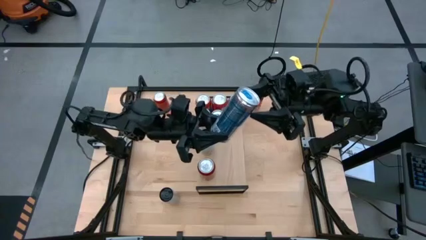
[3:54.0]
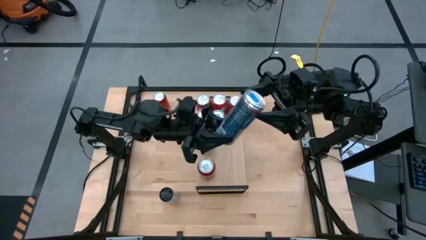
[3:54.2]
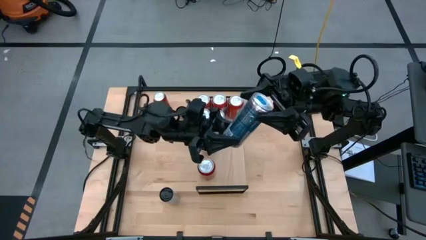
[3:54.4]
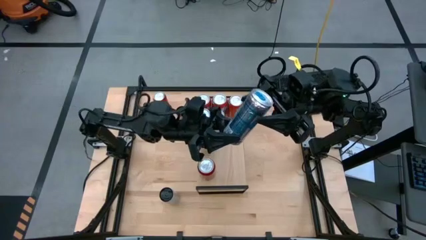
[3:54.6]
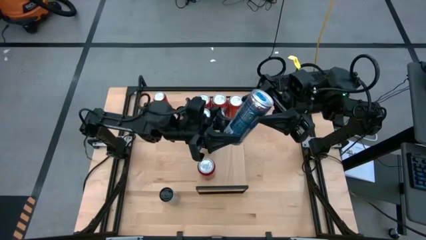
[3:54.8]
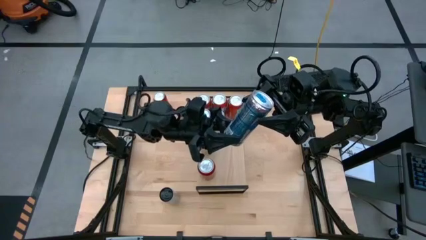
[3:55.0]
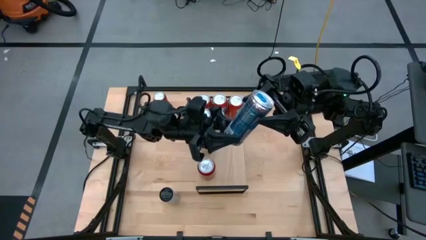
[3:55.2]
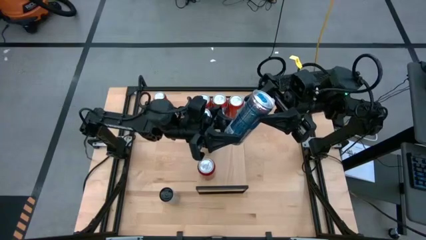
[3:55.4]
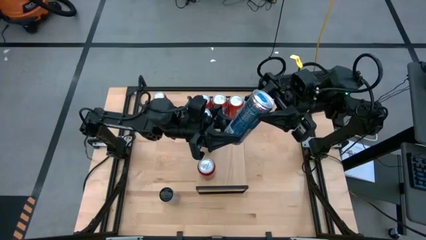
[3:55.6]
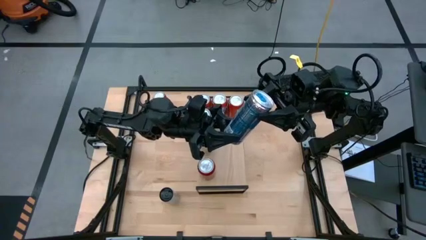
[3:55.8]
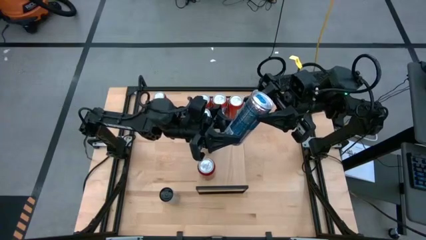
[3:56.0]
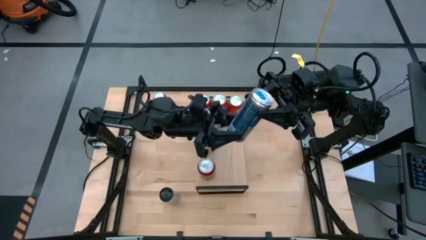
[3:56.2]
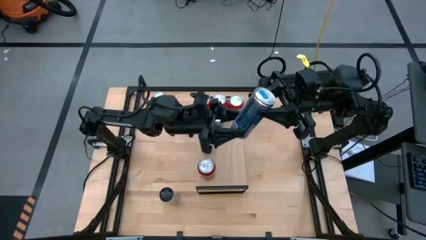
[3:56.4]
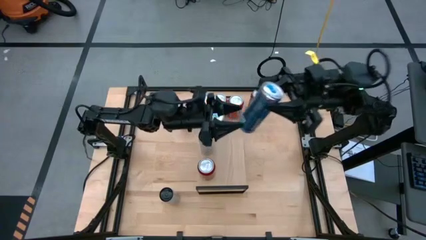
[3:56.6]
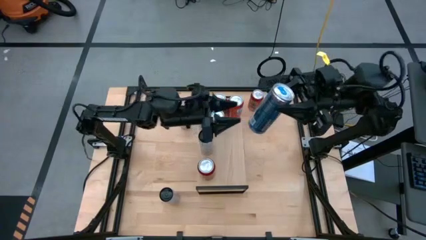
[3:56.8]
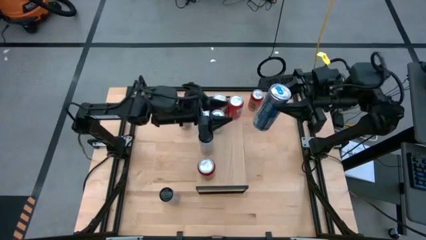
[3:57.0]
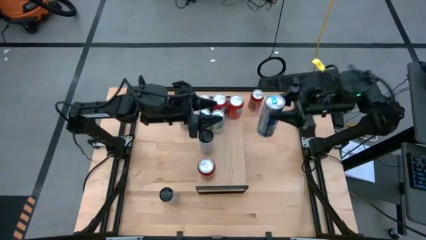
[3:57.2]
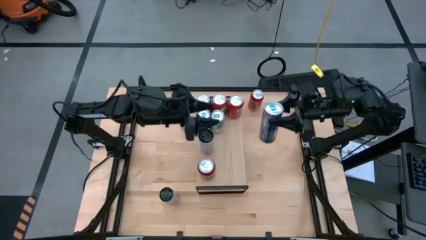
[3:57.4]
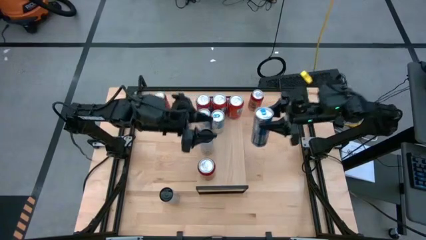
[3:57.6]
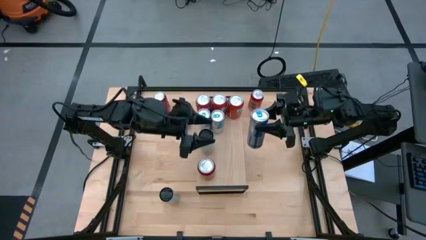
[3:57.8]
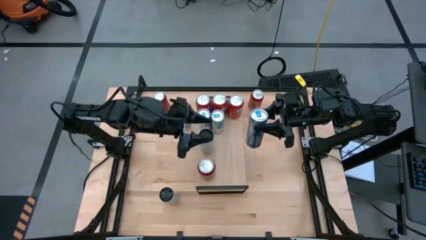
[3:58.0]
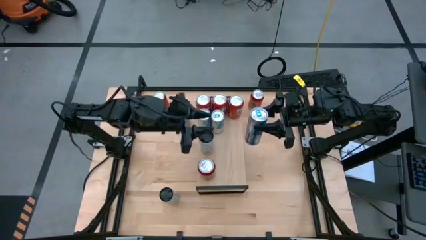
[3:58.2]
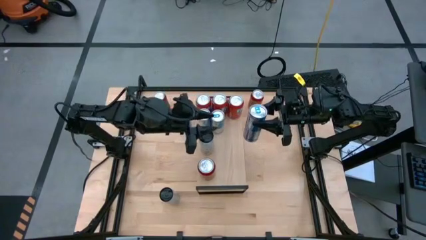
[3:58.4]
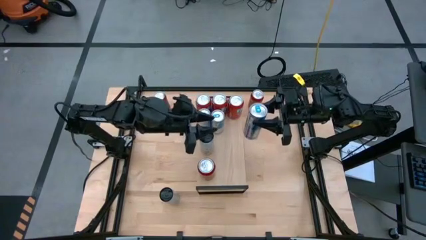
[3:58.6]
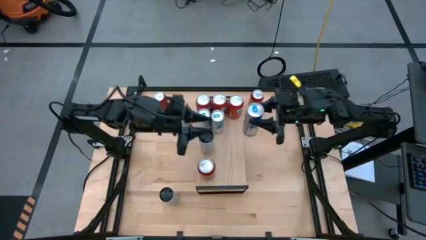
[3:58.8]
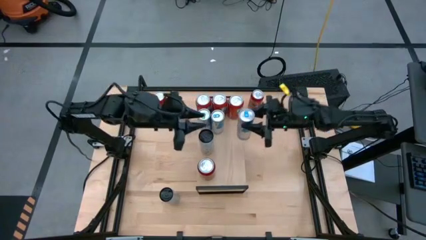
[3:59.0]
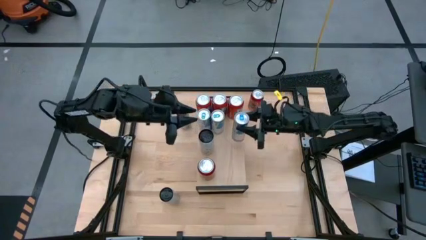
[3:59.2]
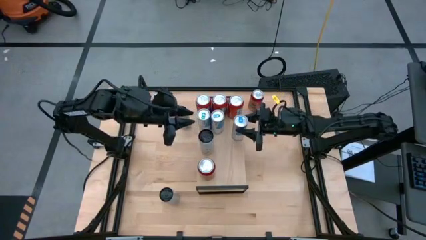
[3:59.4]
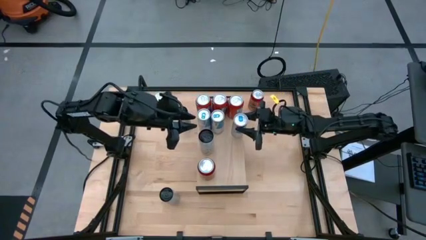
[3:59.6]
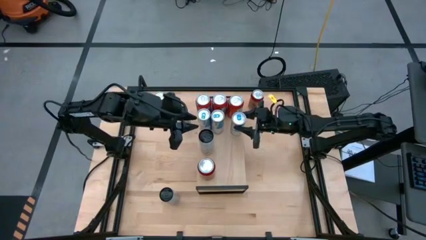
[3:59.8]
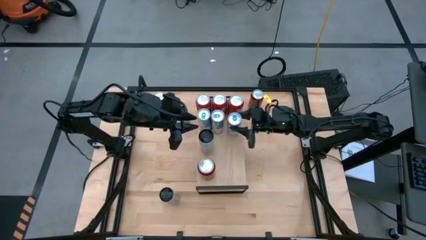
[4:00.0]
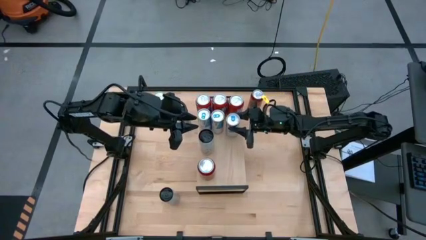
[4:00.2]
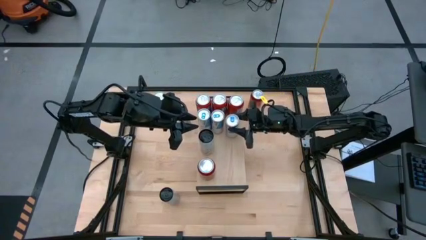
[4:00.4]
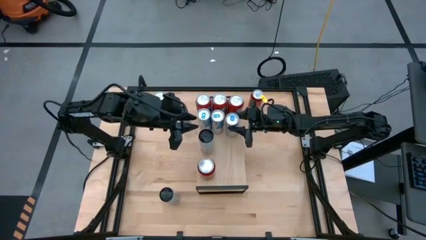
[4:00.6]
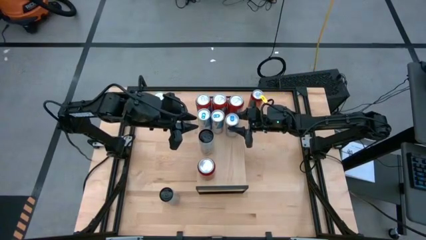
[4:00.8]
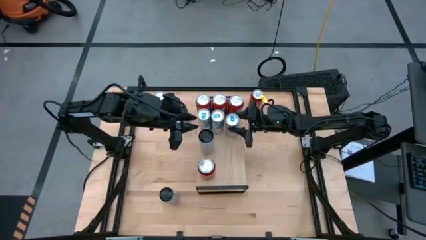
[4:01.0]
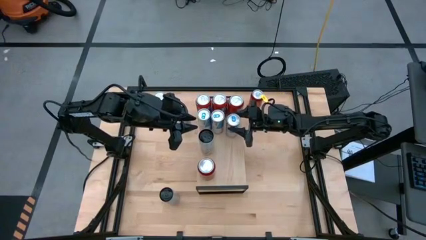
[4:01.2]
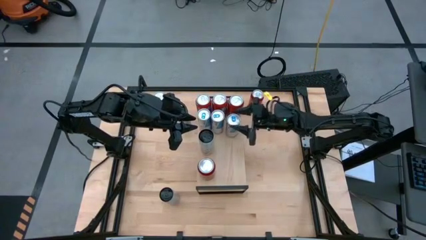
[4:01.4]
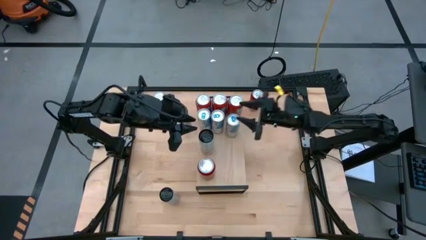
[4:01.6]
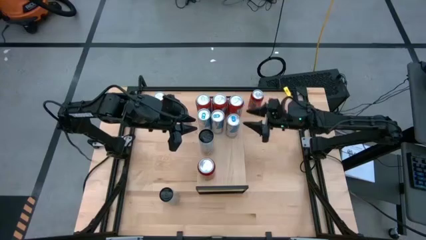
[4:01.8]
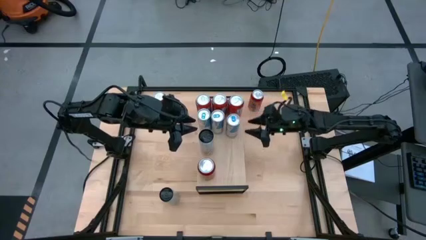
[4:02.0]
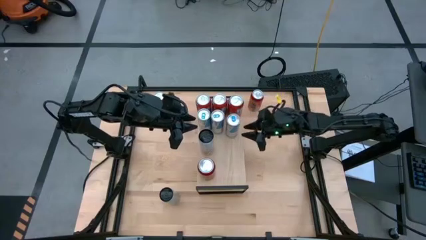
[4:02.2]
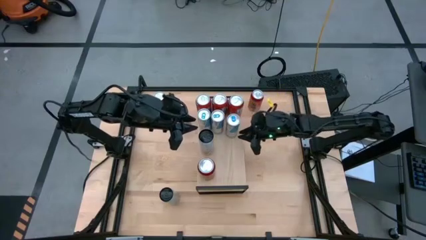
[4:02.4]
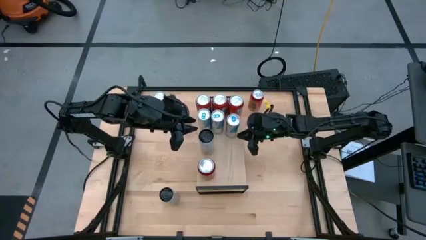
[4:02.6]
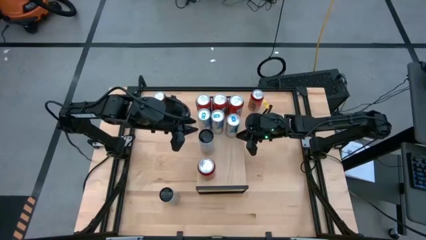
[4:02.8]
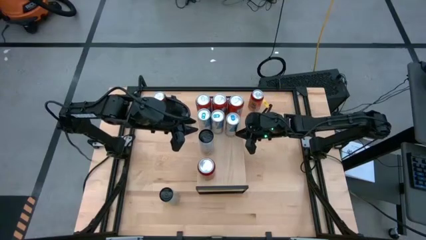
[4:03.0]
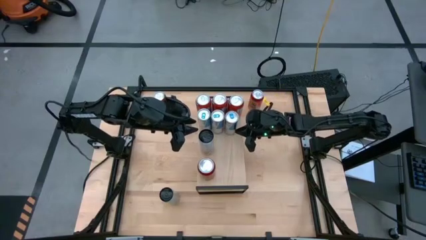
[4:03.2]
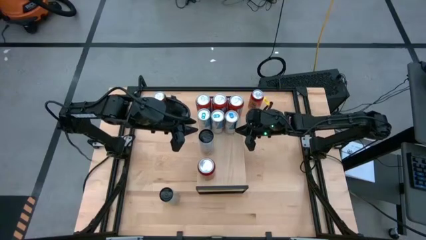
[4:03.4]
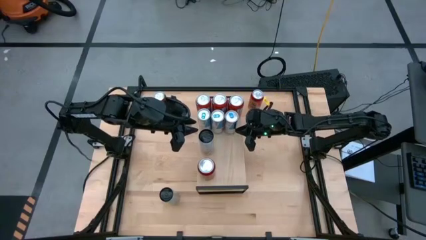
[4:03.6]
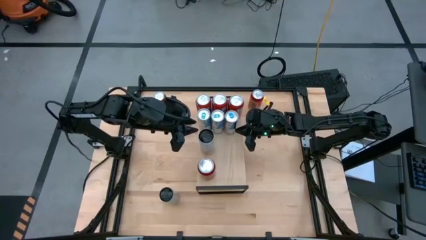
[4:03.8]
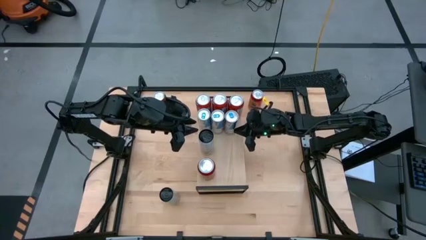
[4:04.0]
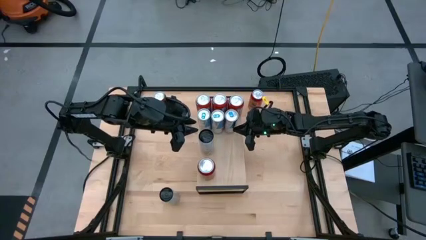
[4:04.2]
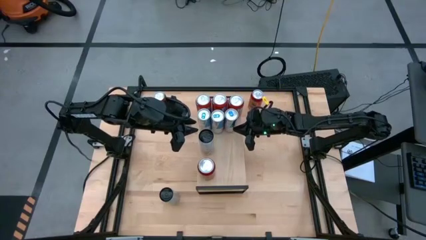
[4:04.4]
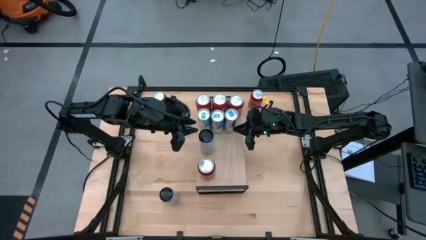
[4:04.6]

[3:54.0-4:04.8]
Task: Place canned beverage on shelf
Put the blue soda can on the shelf aligned with the other blue soda can
